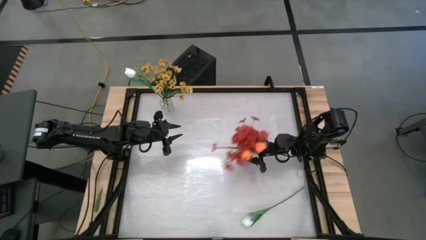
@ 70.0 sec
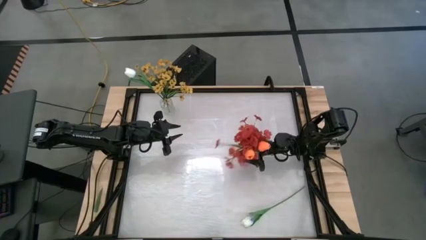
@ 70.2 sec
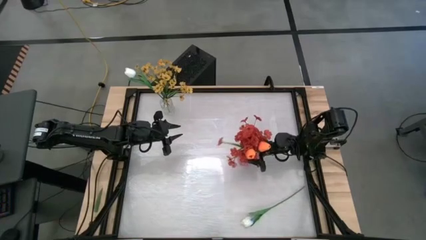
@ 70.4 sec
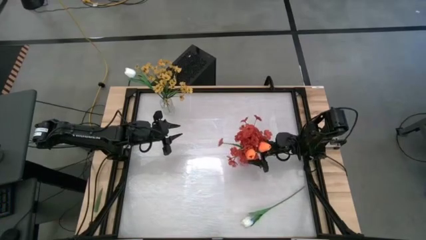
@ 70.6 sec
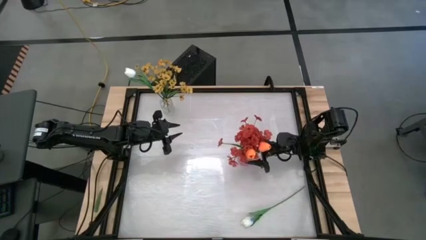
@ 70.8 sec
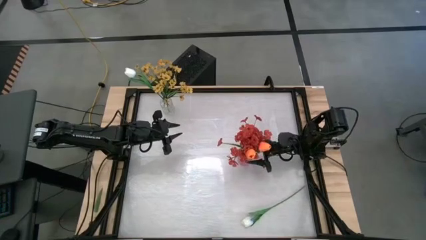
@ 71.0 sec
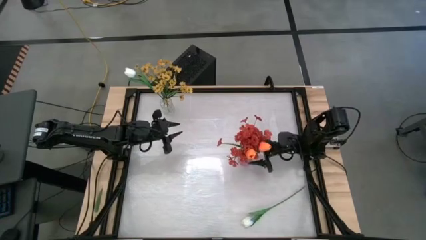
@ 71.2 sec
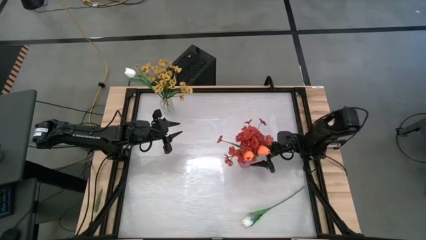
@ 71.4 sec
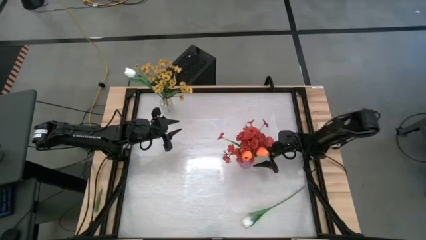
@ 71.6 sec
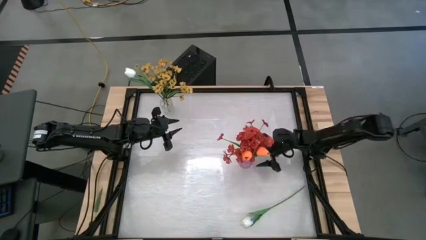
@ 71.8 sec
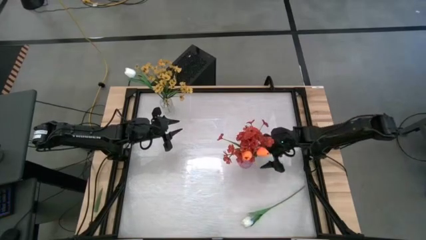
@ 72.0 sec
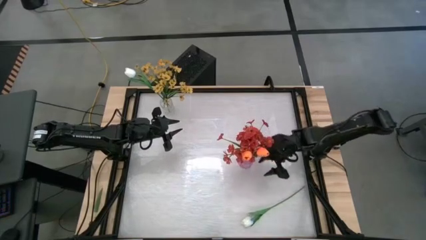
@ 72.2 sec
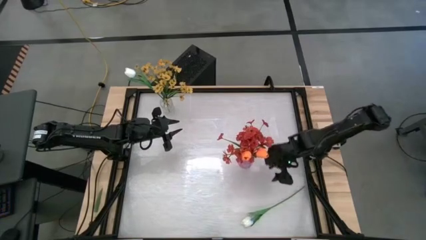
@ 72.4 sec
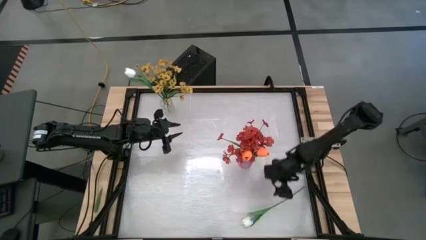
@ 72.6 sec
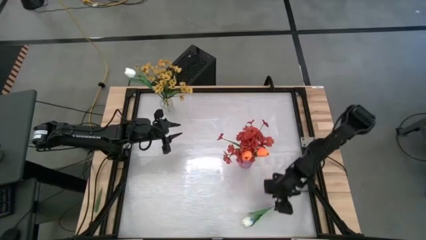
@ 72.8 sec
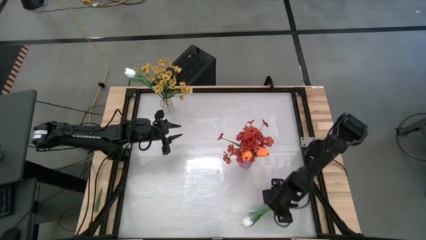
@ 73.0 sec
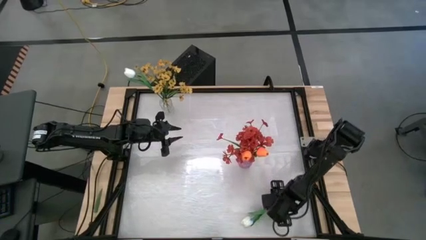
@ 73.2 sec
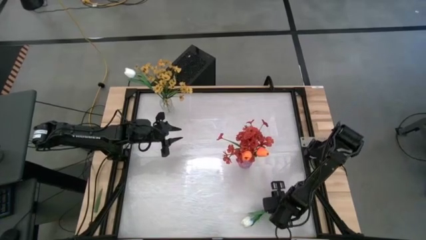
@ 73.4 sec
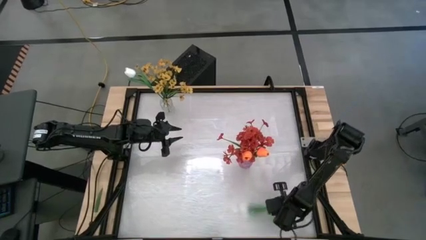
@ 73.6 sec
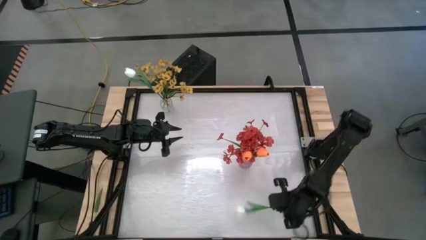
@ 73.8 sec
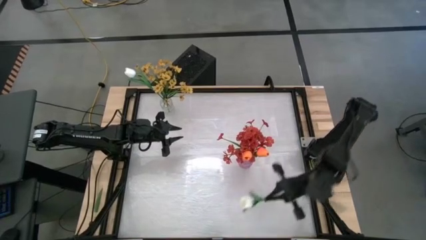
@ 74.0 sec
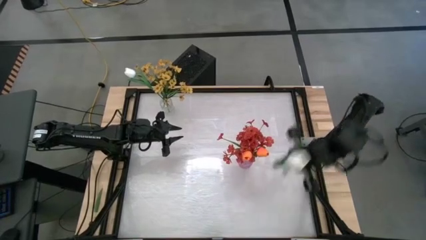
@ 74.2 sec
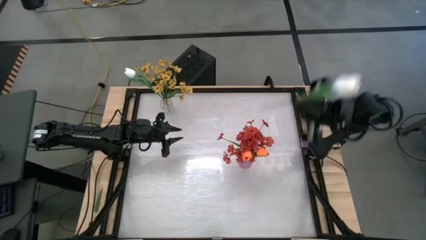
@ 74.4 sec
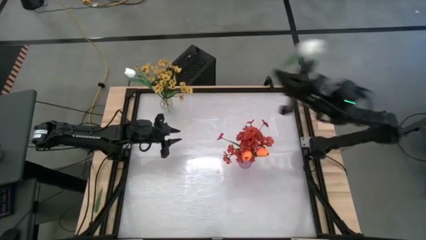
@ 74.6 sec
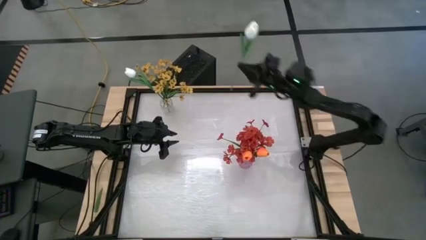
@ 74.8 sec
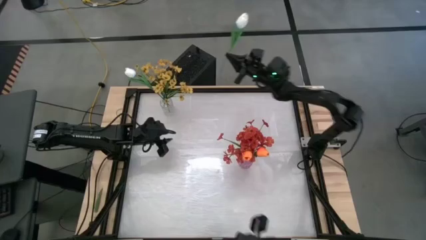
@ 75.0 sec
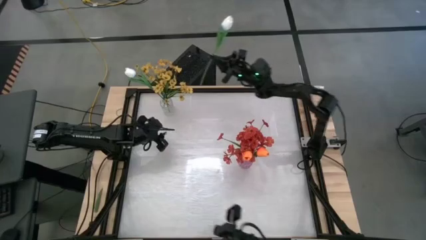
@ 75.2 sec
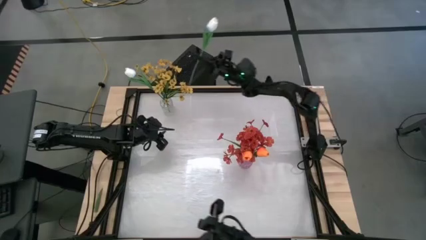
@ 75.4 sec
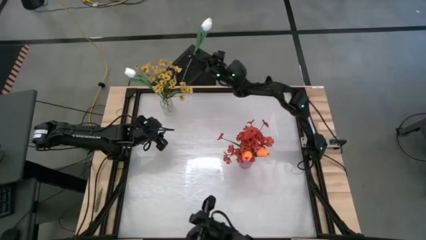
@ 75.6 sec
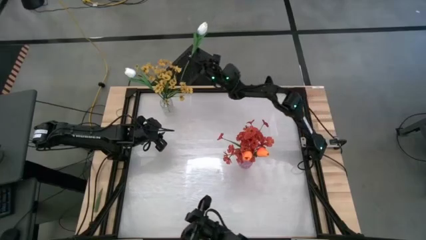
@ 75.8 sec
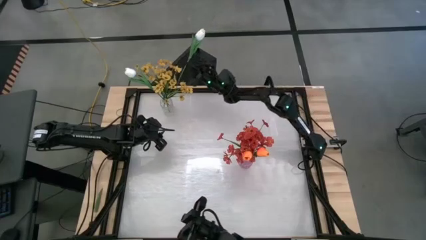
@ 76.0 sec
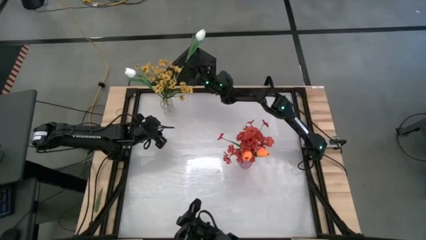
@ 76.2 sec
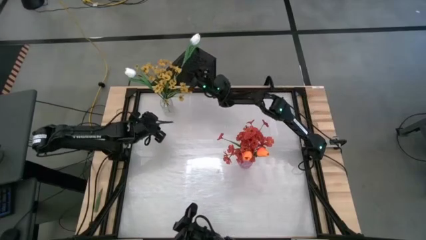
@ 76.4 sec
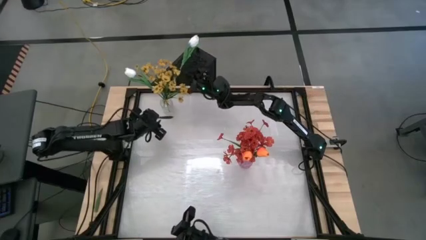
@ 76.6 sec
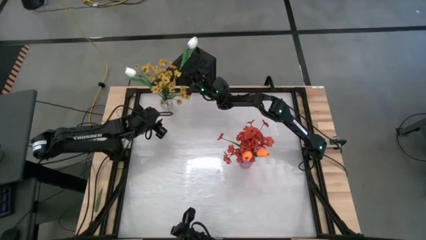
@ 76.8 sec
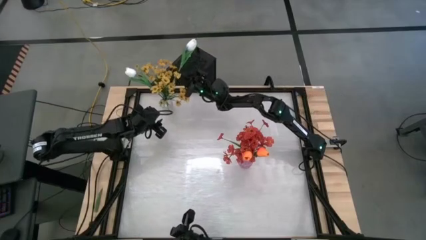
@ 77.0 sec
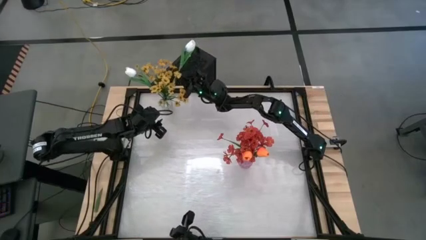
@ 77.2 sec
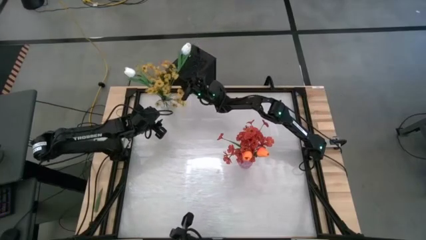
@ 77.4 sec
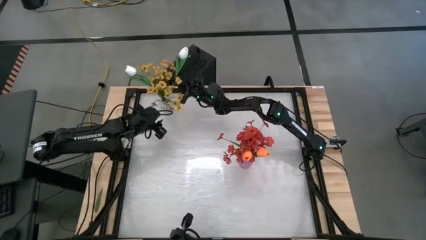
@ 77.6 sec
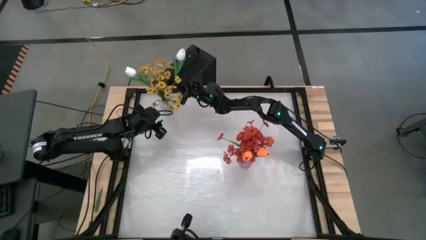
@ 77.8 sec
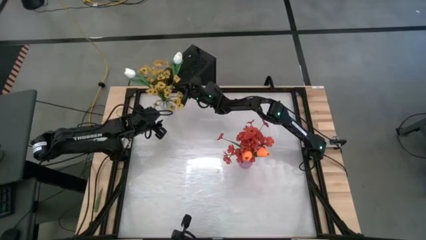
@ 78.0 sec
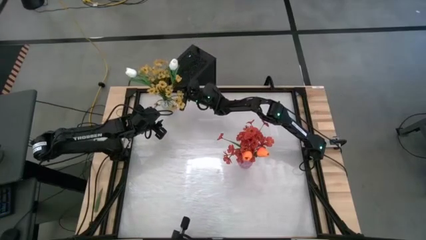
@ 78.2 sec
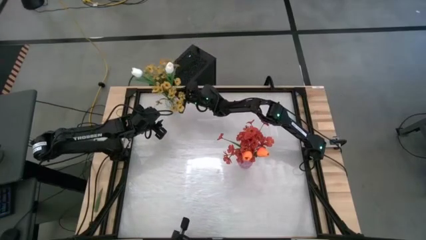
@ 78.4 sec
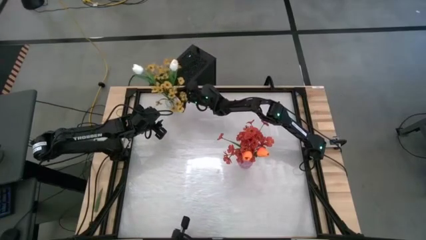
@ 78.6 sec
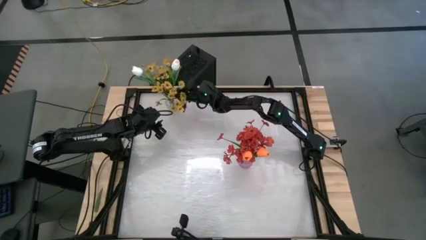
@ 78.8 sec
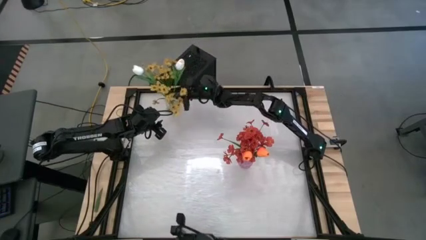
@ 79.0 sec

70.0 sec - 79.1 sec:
Task: Sort flowers into vase by color
Put the white flower into the clear transparent vase

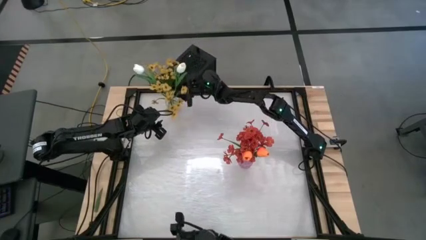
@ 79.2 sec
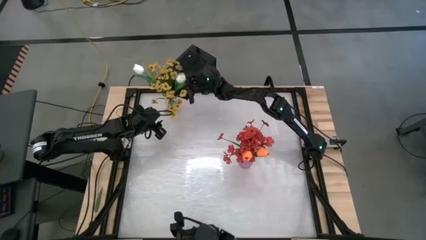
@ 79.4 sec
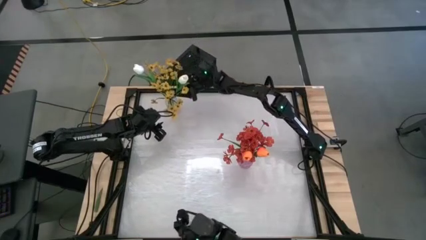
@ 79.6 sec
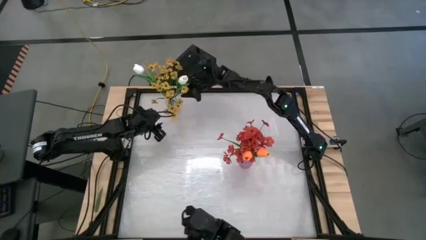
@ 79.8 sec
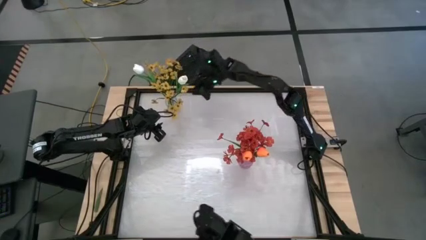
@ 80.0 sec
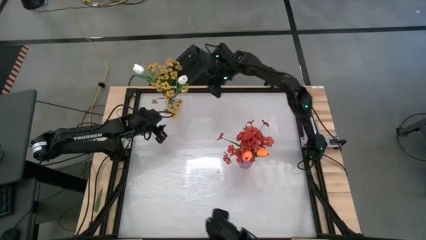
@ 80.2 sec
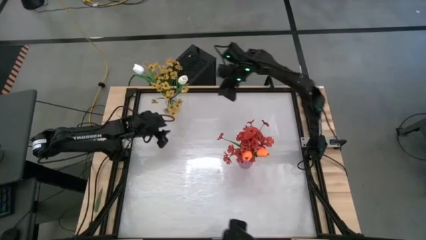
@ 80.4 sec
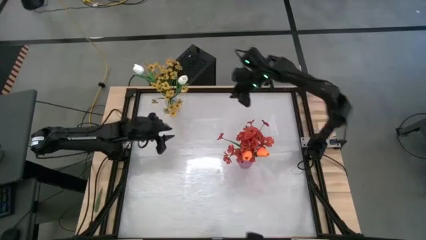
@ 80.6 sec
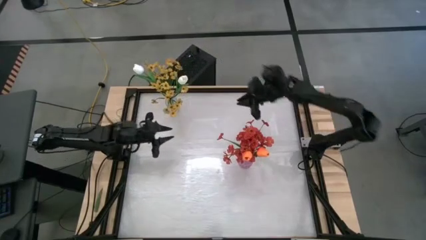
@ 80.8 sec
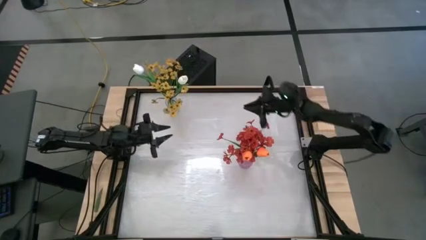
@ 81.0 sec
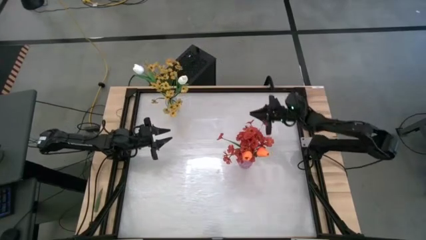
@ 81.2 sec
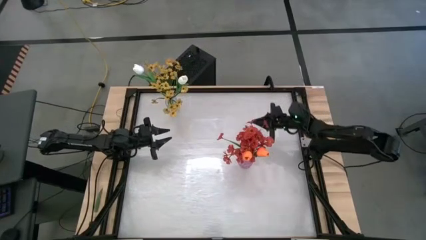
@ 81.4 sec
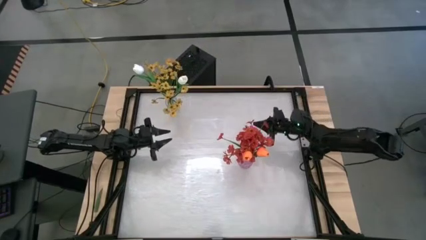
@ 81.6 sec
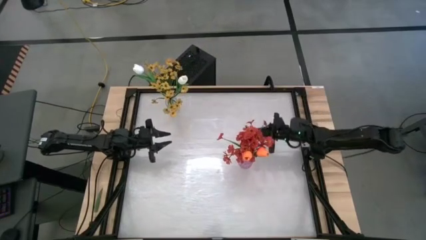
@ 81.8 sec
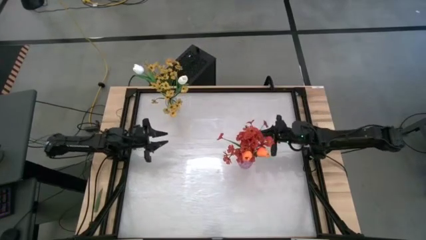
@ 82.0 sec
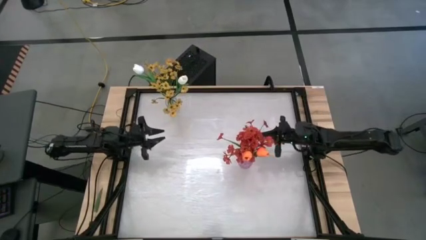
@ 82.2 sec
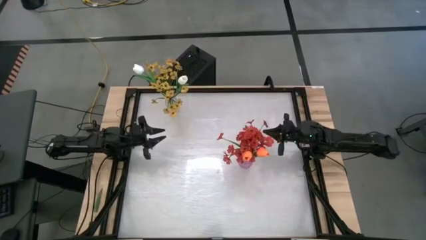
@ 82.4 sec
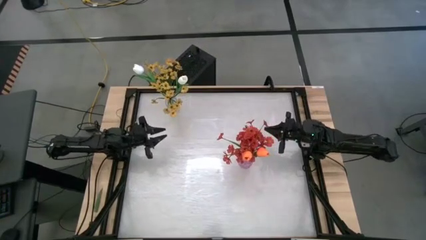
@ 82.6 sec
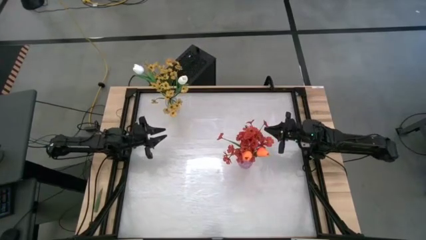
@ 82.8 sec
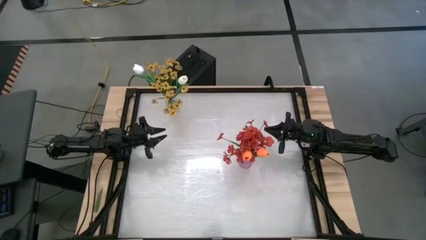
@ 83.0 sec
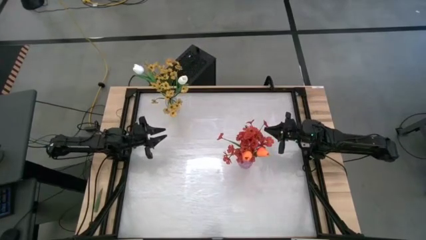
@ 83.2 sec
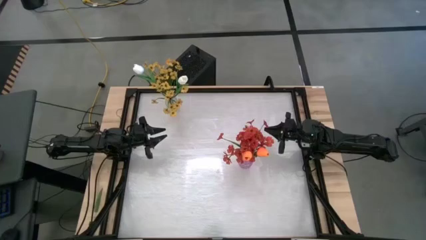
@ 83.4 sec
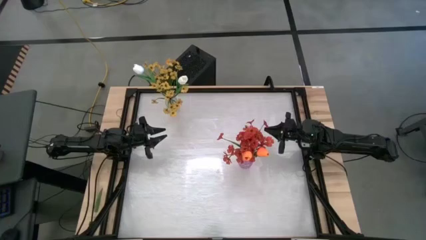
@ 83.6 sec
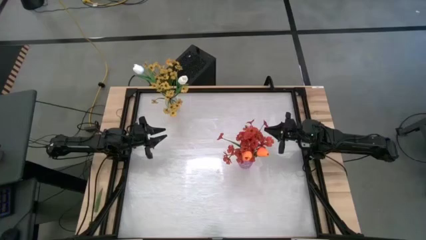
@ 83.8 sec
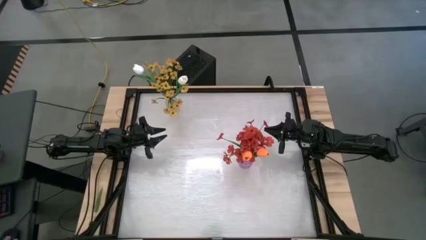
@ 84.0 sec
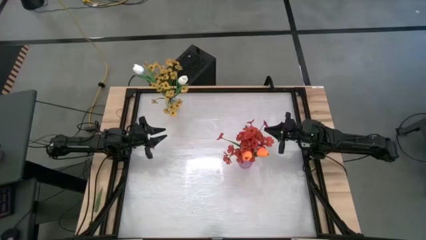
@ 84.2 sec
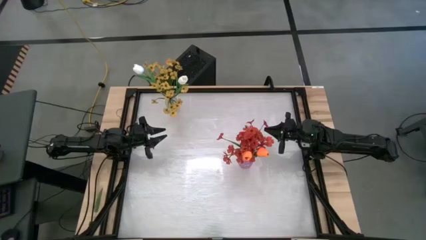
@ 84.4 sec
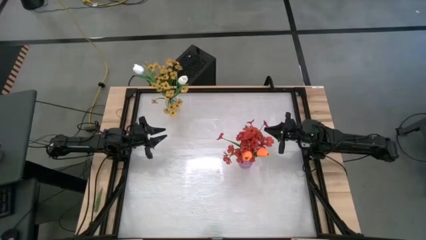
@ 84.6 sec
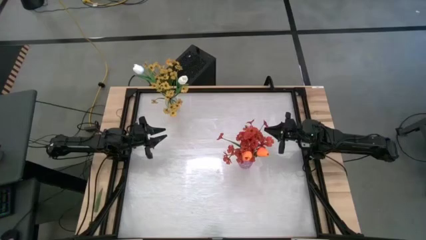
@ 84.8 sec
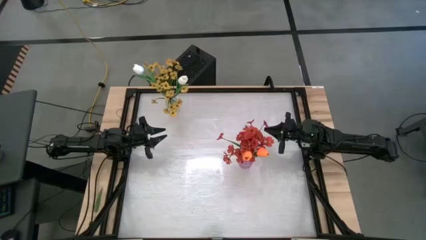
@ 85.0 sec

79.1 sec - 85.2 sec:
Return to Home Position
